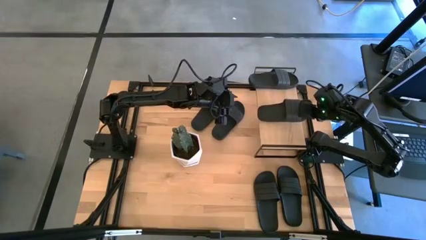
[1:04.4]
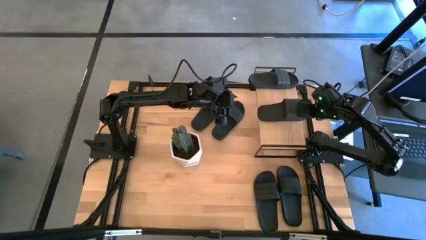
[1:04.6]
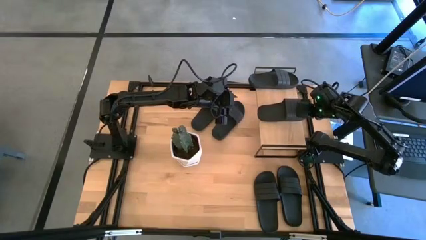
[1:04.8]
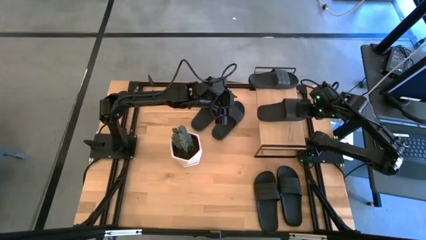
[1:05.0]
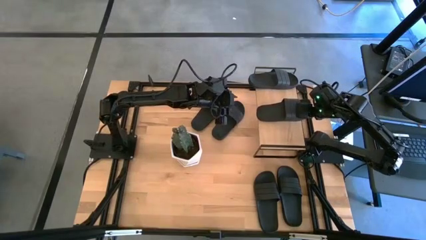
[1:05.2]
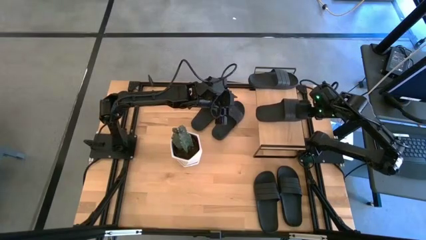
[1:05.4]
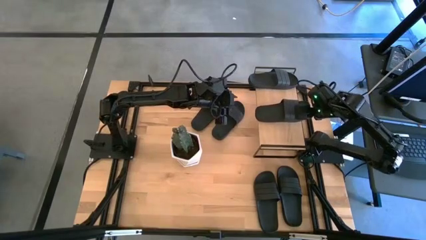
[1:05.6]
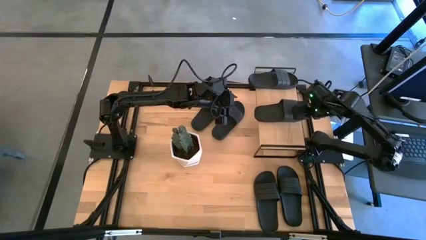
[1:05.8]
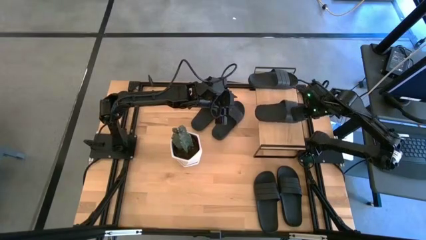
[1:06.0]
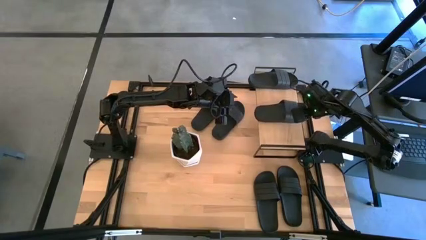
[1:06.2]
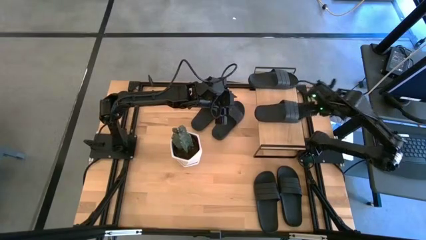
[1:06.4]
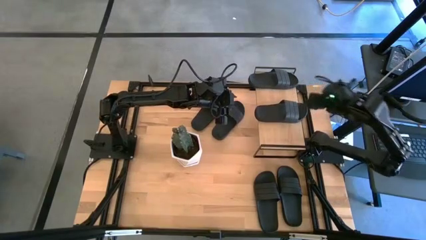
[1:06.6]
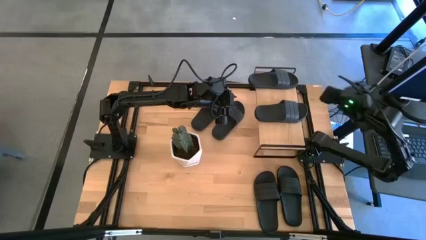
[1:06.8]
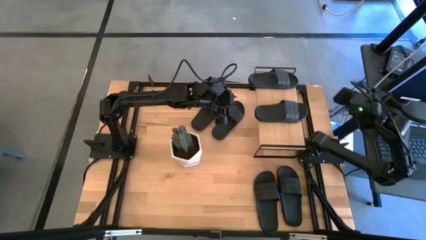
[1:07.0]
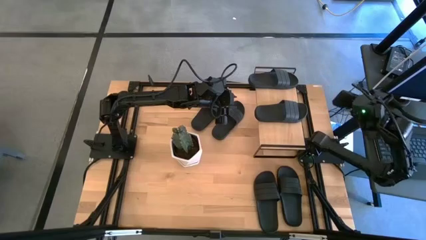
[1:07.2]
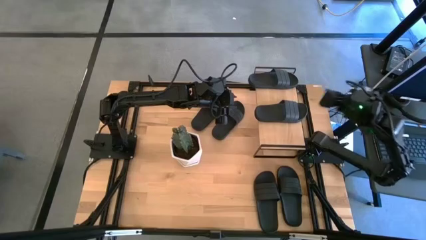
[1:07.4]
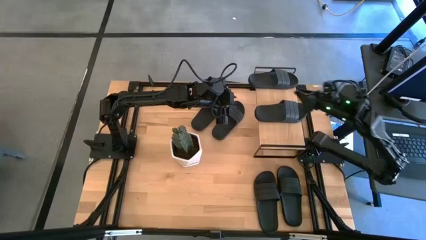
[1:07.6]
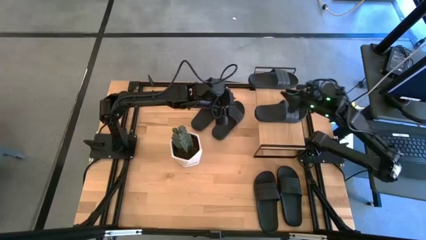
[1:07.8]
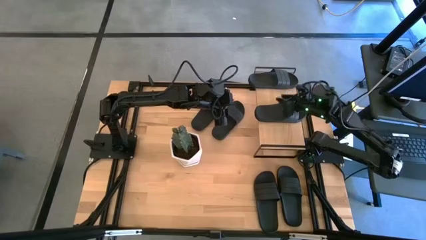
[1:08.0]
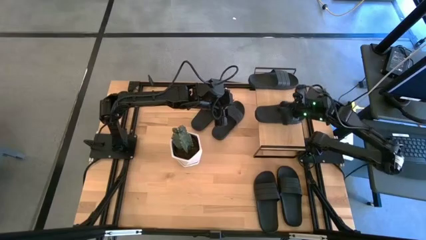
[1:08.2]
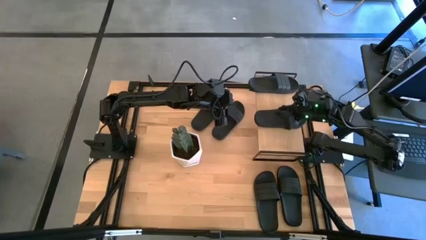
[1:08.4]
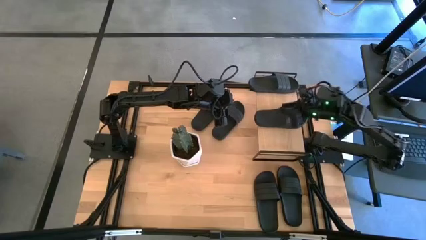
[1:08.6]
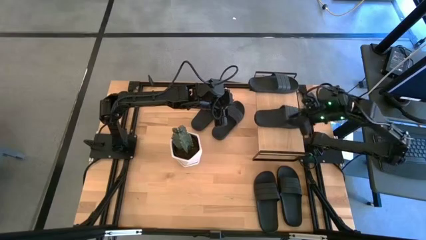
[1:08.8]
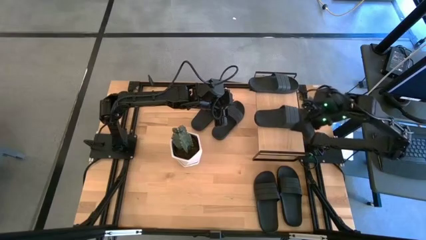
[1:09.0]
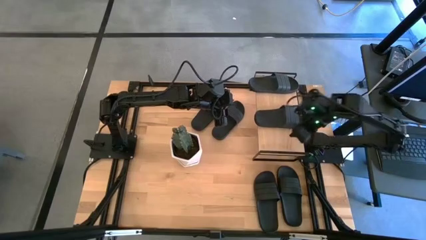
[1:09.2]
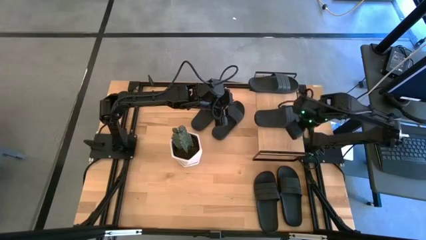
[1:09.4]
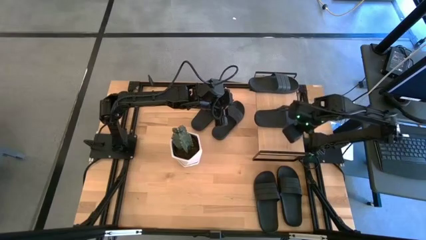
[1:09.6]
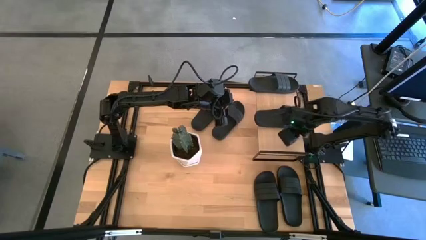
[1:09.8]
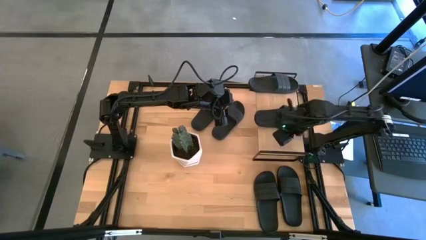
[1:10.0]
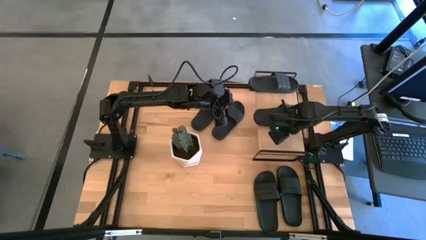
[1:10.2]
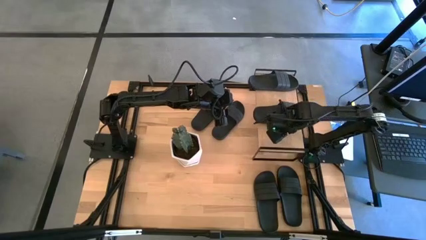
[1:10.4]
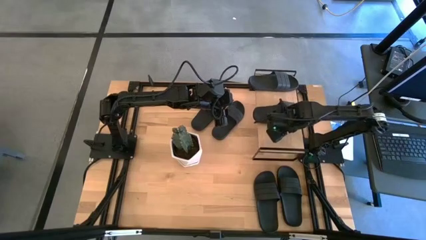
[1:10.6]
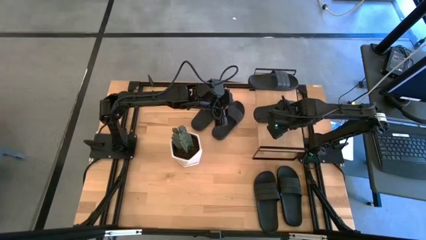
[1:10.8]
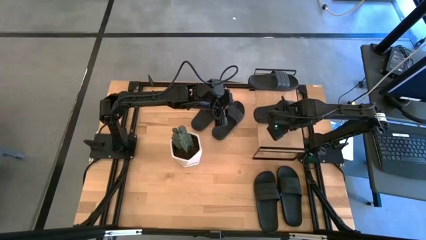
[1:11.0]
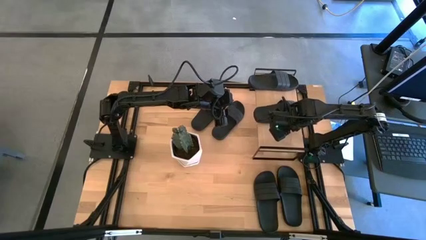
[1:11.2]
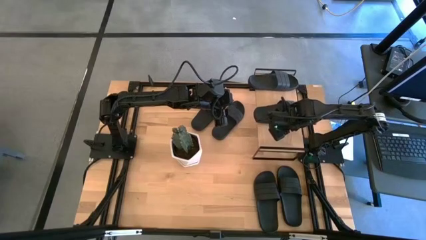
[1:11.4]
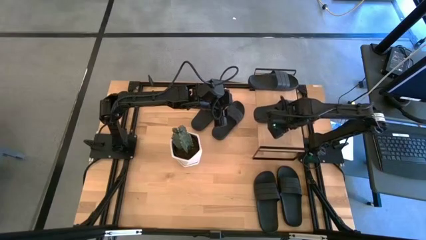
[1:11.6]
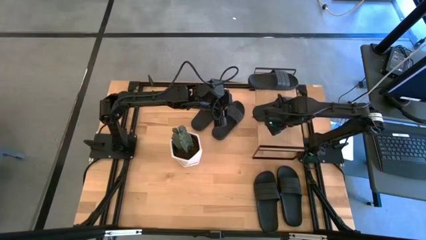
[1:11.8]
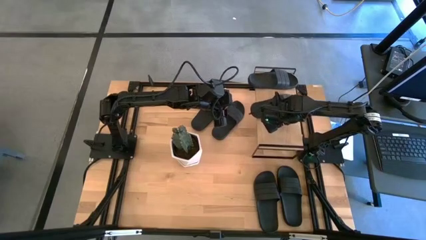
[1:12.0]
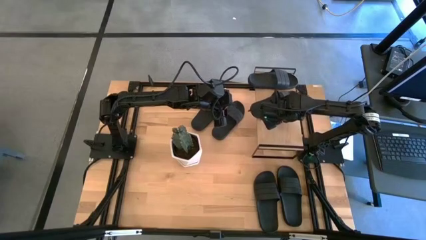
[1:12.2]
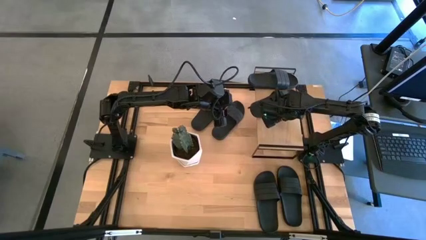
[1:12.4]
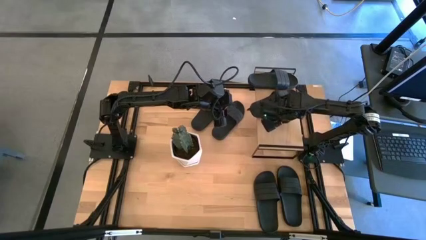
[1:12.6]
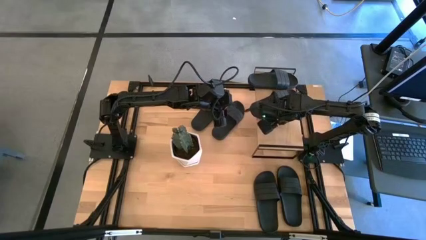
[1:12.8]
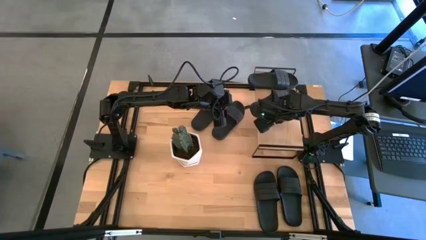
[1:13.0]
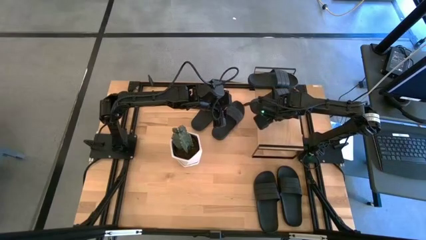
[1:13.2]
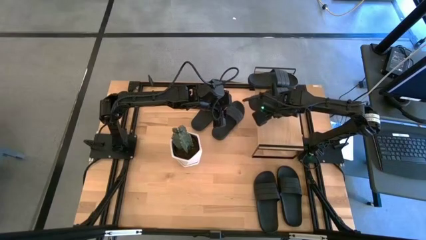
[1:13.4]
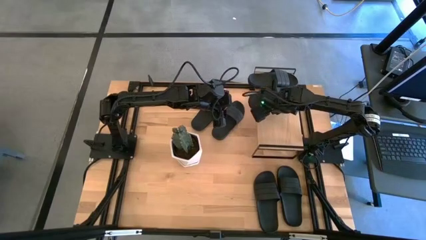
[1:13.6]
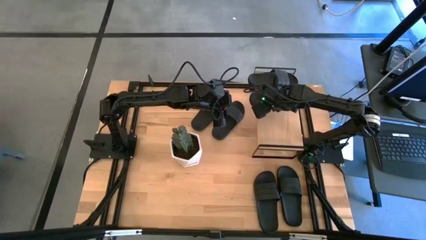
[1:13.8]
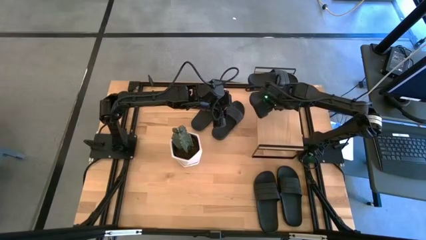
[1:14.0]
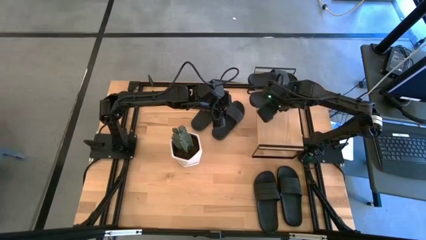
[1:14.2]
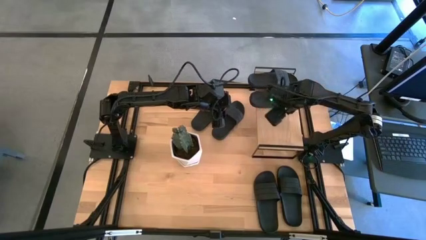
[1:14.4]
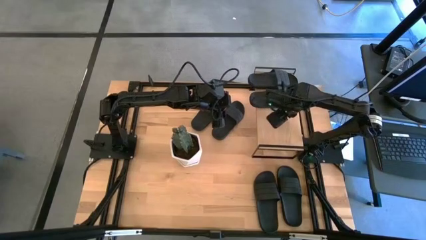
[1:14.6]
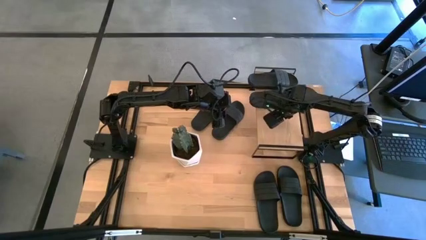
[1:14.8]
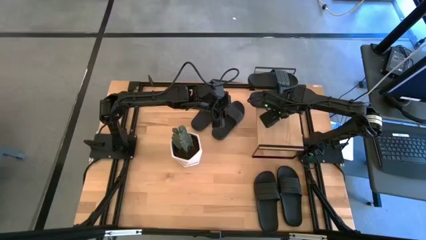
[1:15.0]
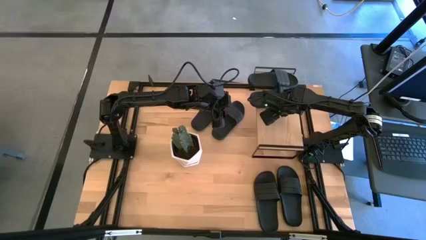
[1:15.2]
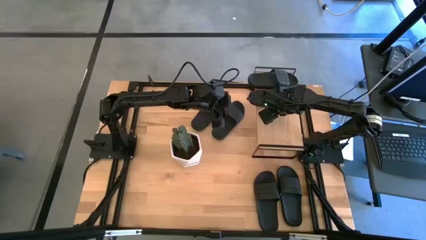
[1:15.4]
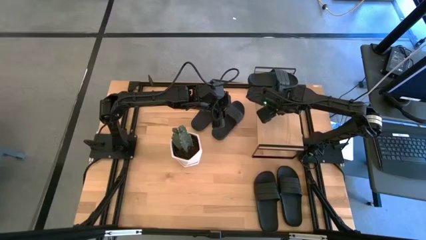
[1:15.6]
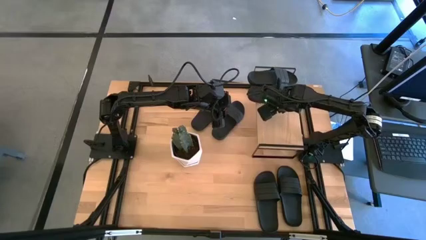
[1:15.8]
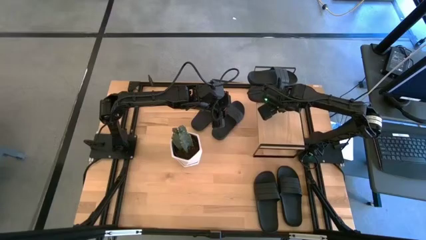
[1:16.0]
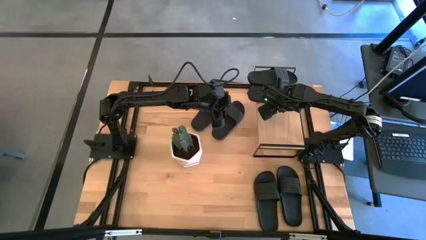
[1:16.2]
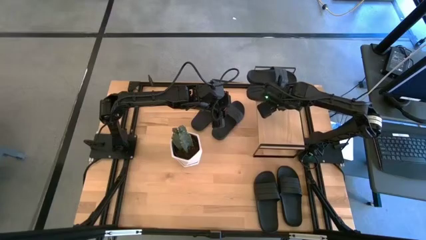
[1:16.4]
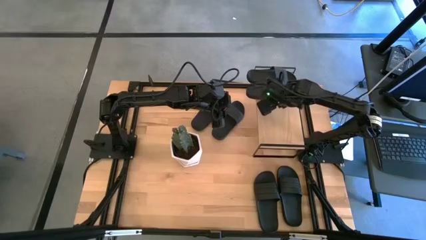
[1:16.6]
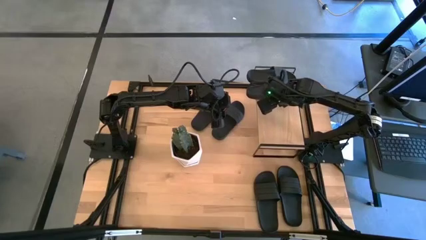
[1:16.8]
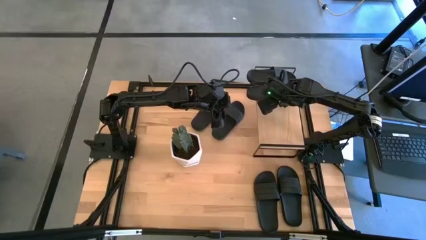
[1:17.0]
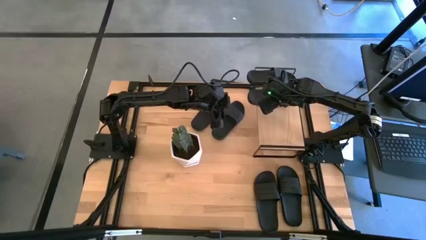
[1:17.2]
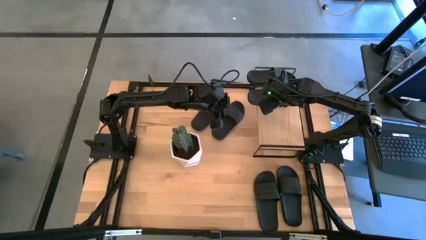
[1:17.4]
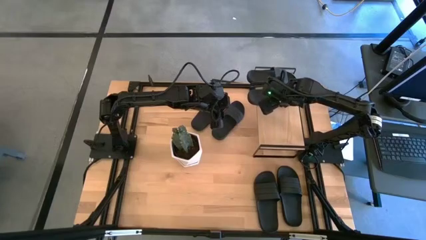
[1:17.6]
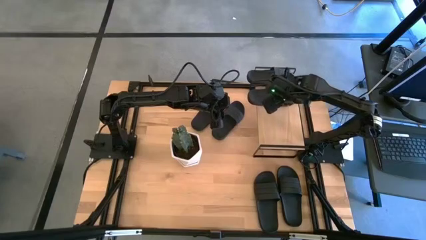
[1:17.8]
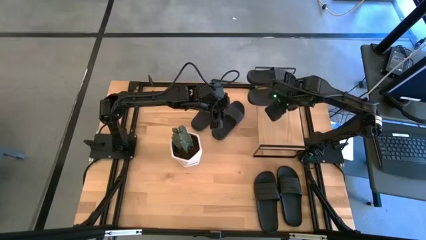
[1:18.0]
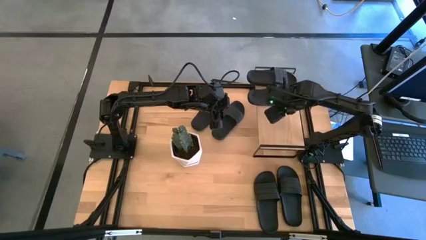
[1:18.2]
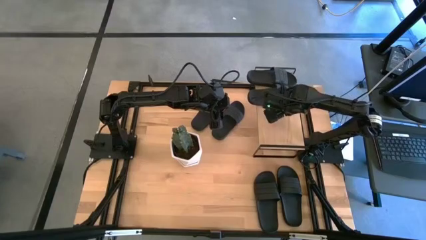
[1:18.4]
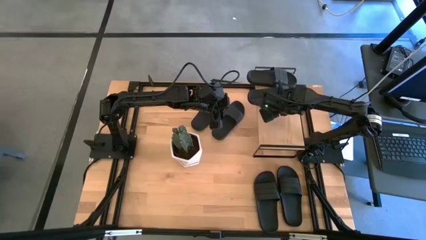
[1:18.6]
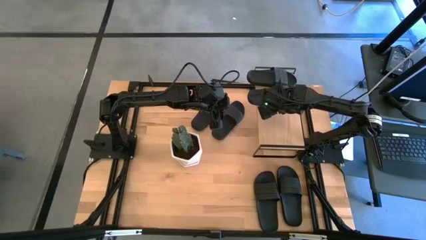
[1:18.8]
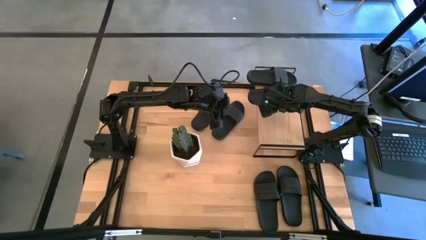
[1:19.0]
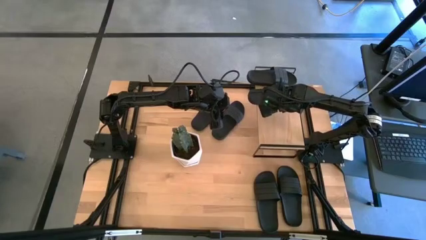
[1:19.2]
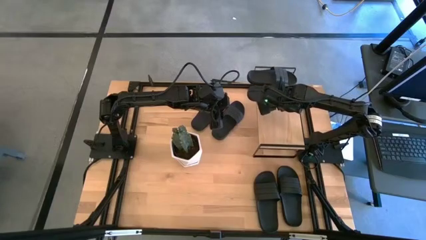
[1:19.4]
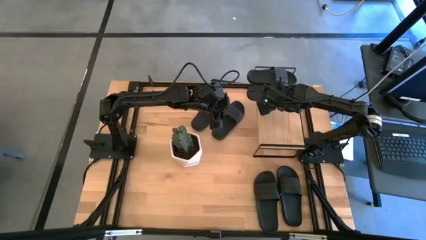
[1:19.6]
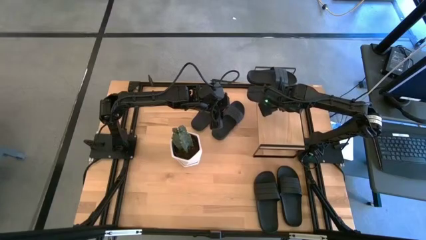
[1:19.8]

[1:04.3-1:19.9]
Task: Pick and place slides into the shelf
Put the black slide on the shelf
